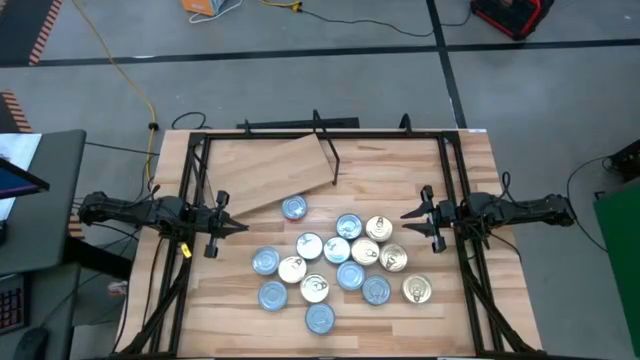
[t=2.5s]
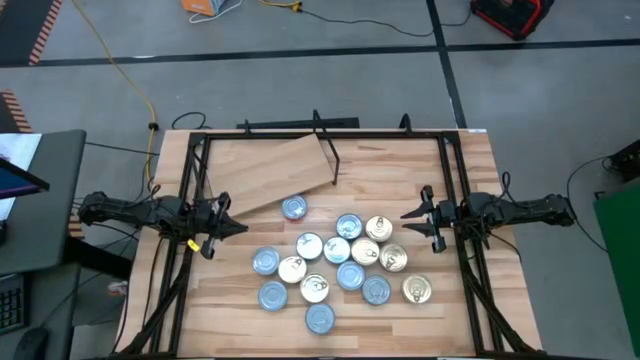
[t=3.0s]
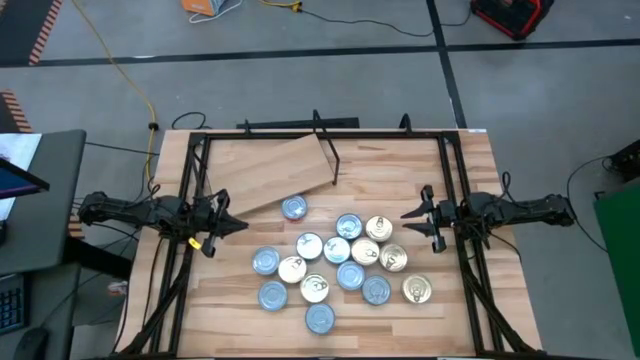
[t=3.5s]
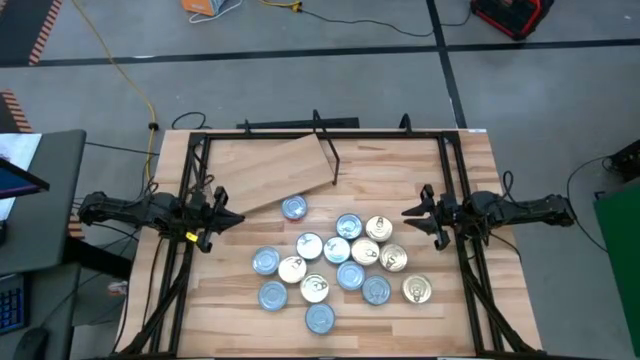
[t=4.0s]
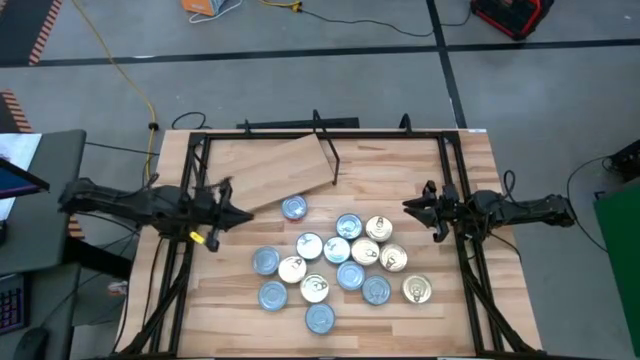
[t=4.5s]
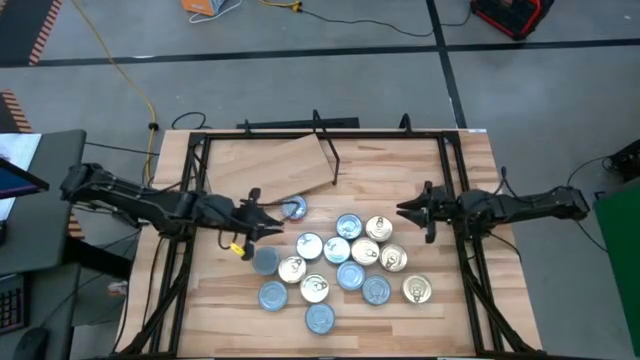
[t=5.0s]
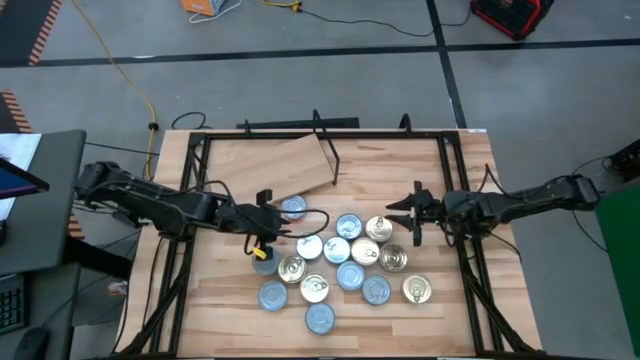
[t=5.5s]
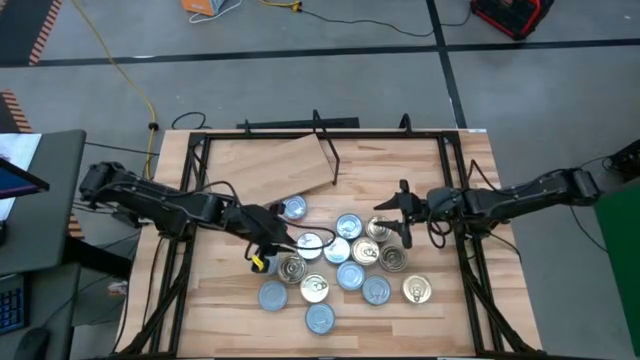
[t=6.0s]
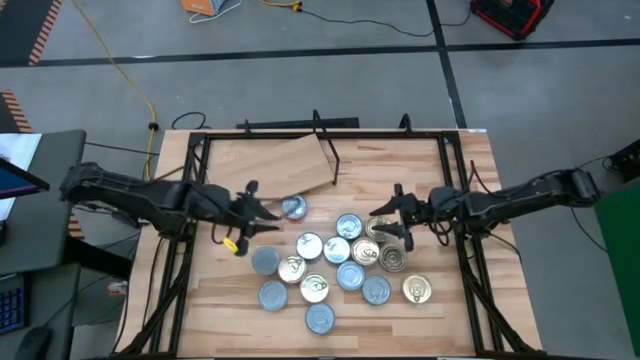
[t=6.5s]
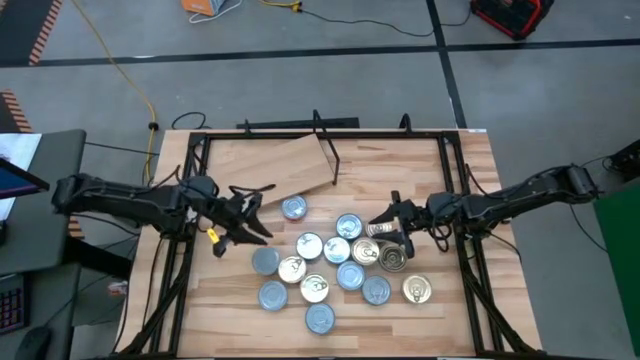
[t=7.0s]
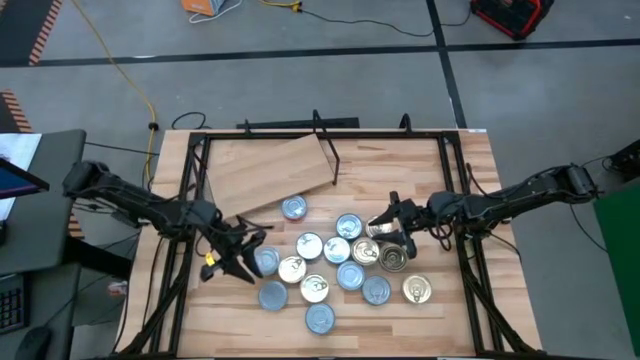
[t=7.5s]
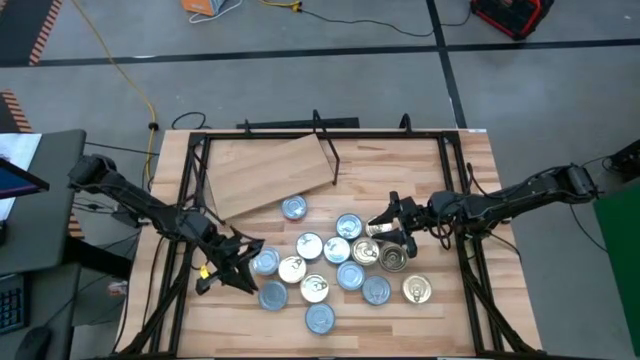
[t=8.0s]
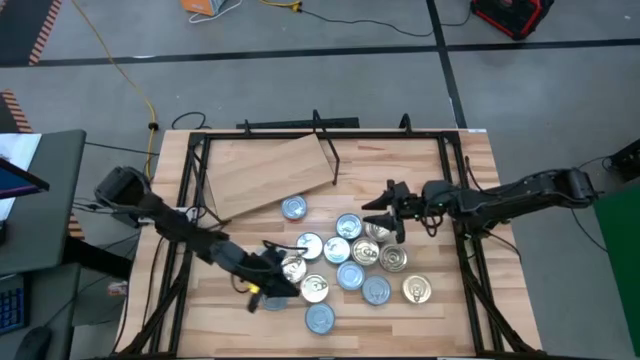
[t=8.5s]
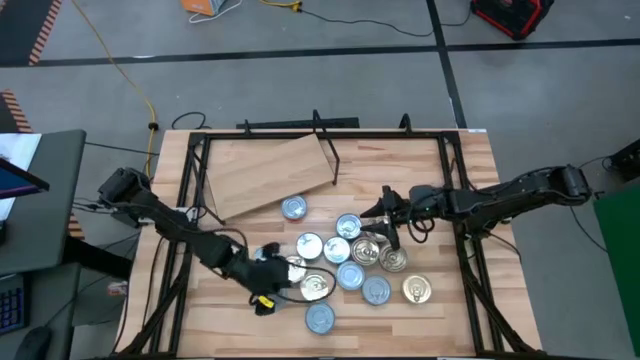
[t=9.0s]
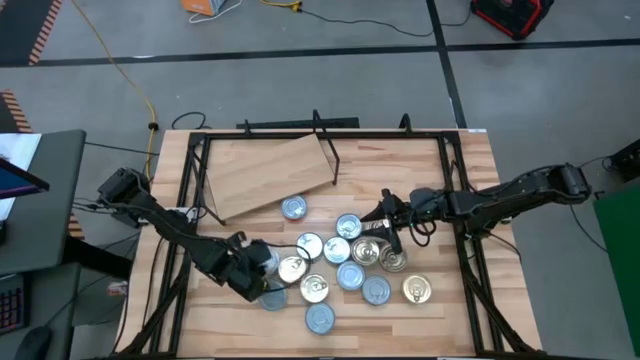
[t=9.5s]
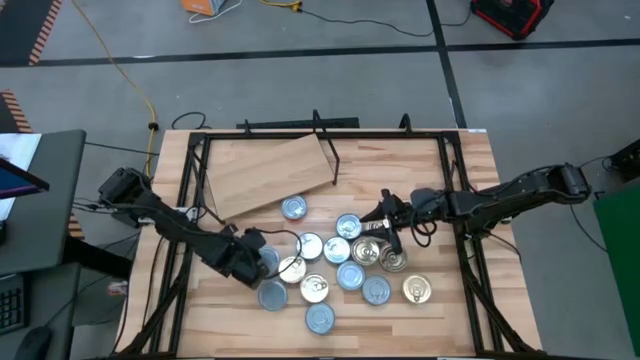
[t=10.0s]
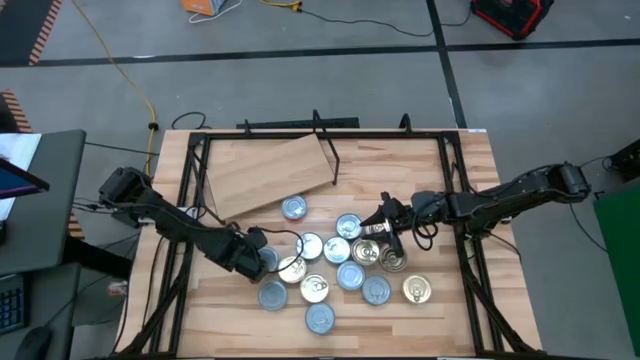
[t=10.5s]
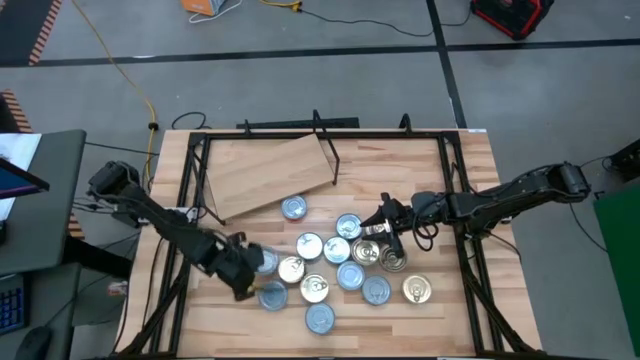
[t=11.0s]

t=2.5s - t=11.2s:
Task: Stack canned seafood by type on shelf
Put the green white tuna can on the shelf

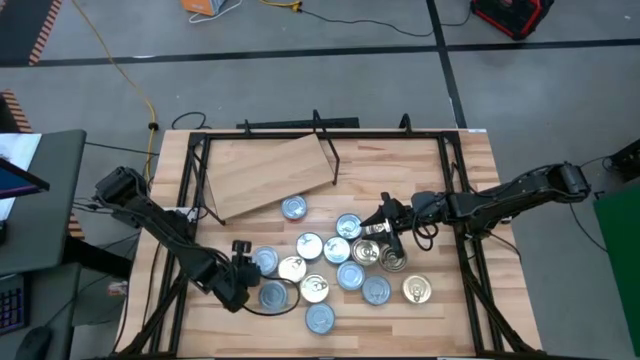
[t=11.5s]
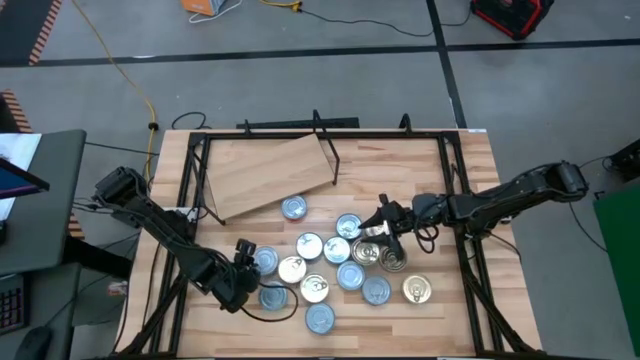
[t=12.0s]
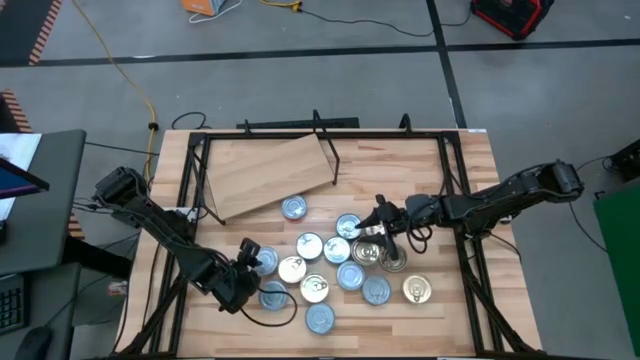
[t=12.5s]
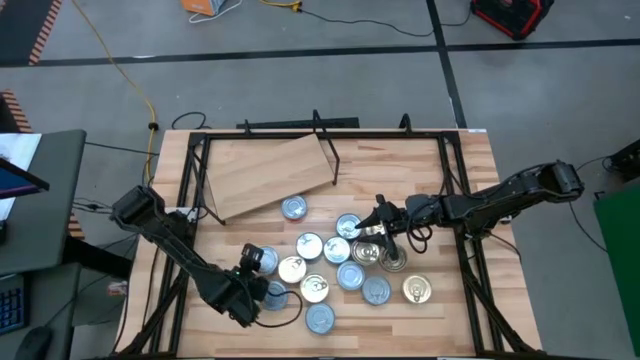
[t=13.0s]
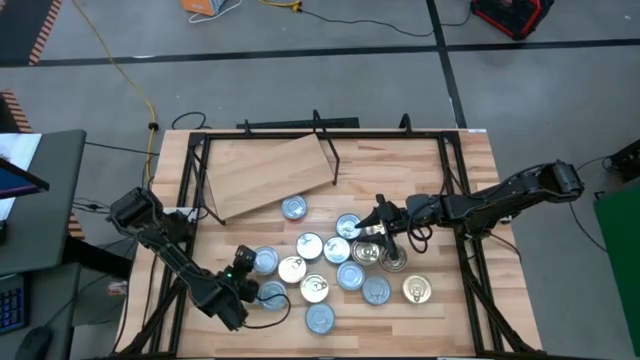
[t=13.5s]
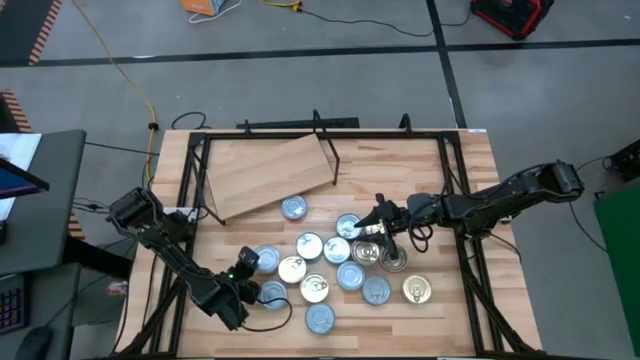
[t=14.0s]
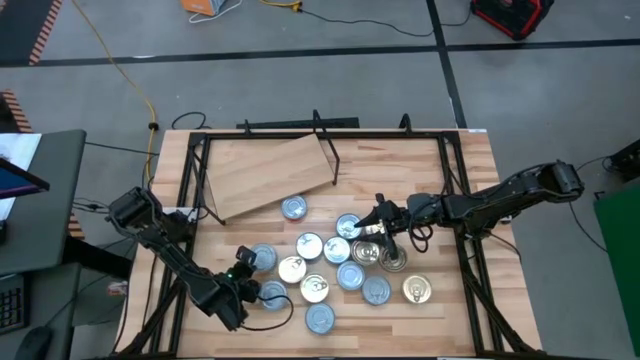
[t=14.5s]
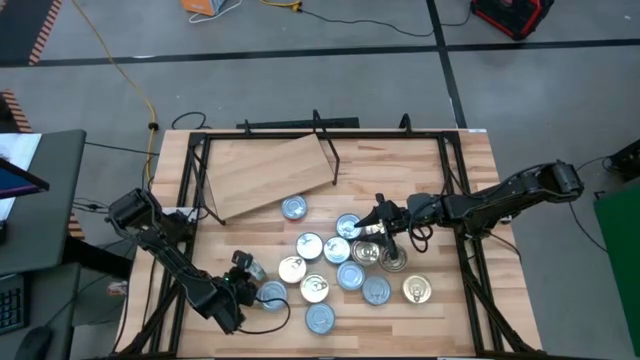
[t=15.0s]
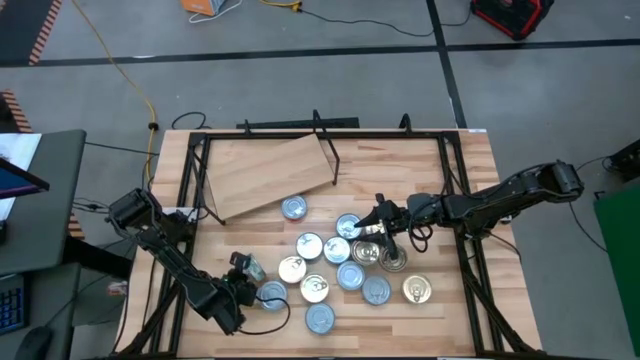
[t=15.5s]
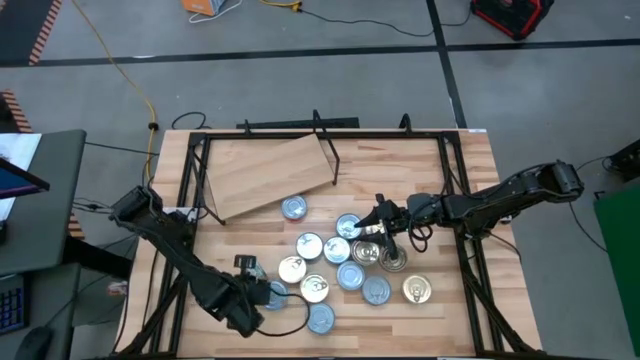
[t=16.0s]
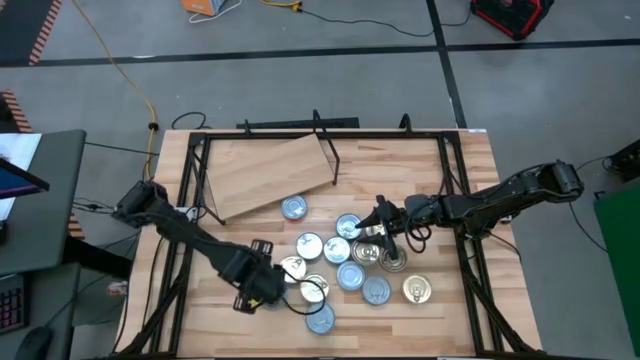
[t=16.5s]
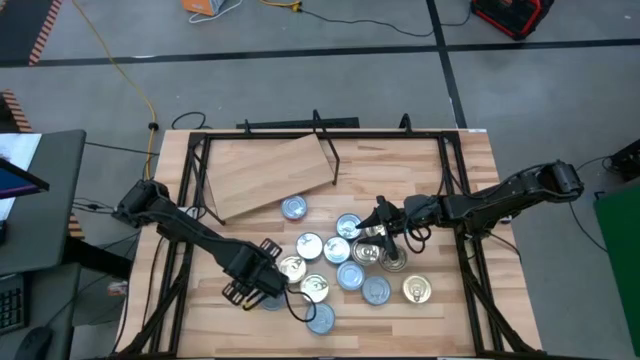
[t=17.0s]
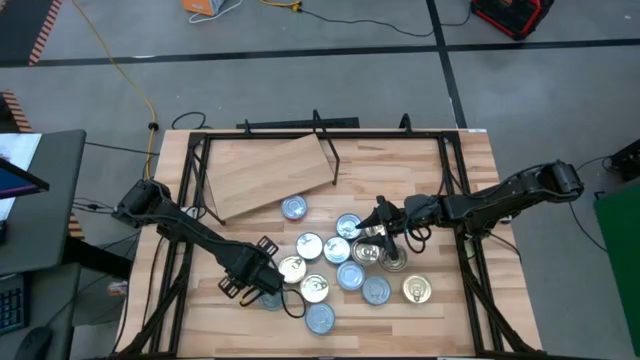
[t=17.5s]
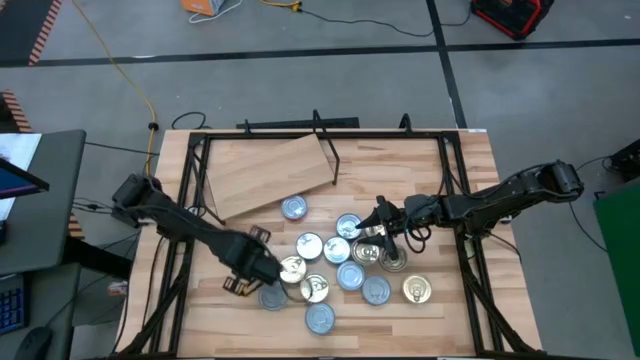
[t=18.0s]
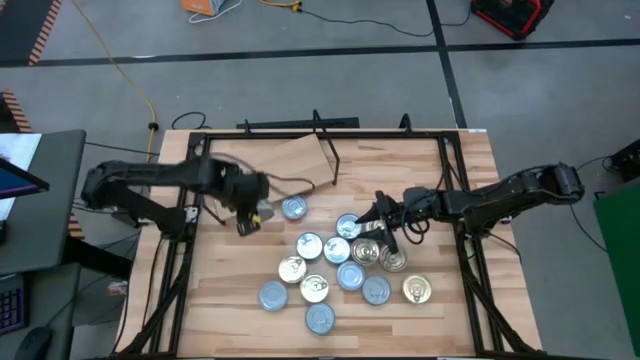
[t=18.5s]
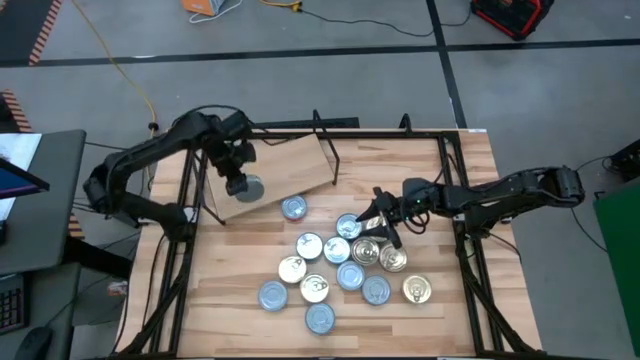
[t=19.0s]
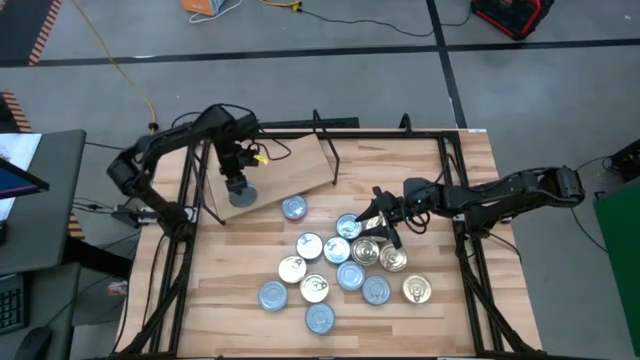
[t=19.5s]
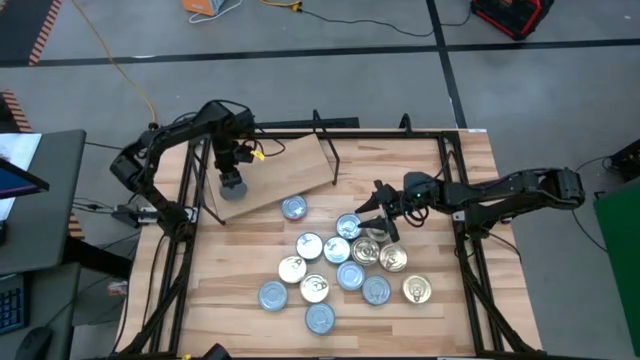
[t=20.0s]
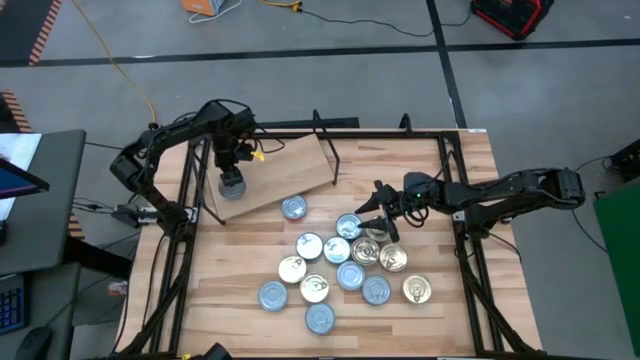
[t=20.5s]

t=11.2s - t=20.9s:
Put the green white tuna can on the shelf
